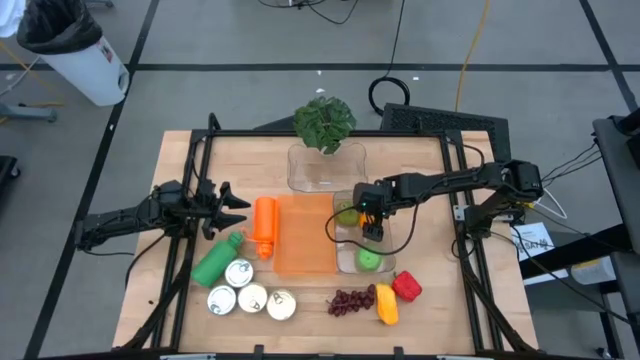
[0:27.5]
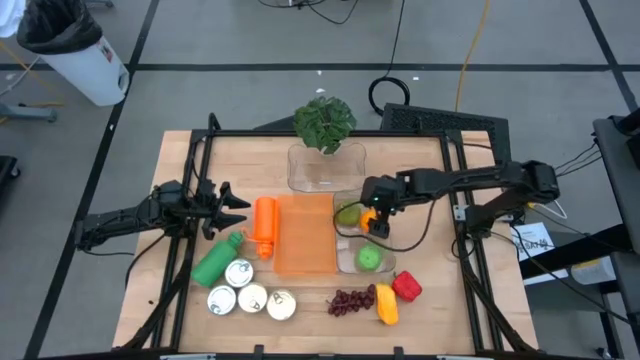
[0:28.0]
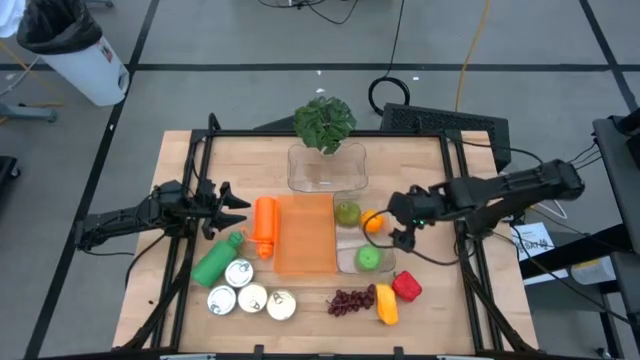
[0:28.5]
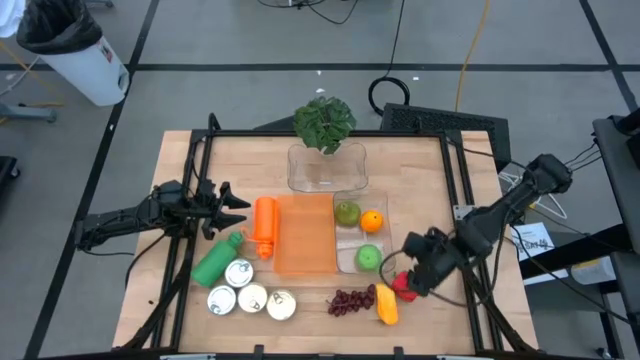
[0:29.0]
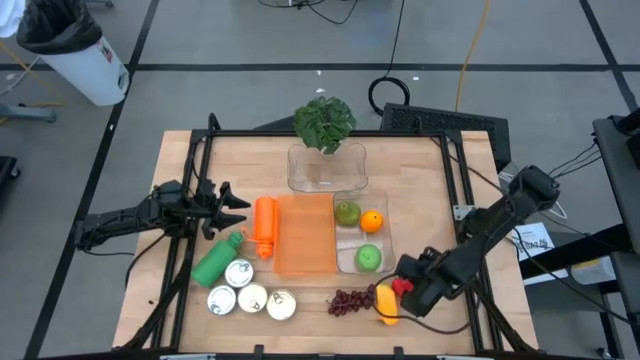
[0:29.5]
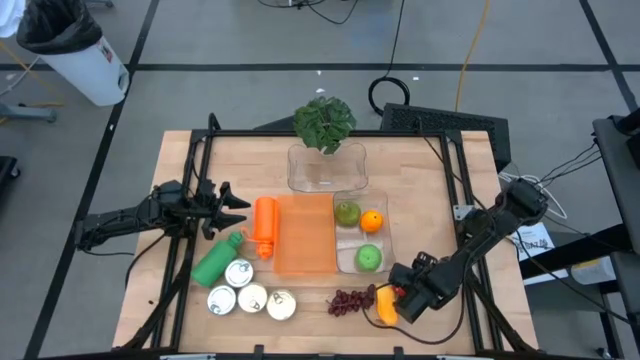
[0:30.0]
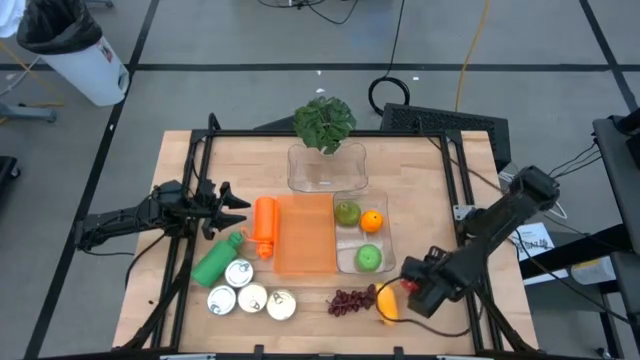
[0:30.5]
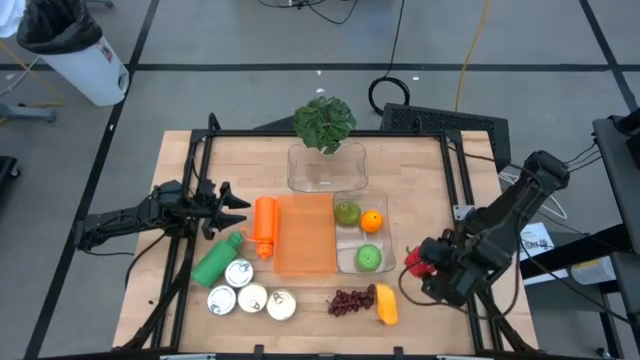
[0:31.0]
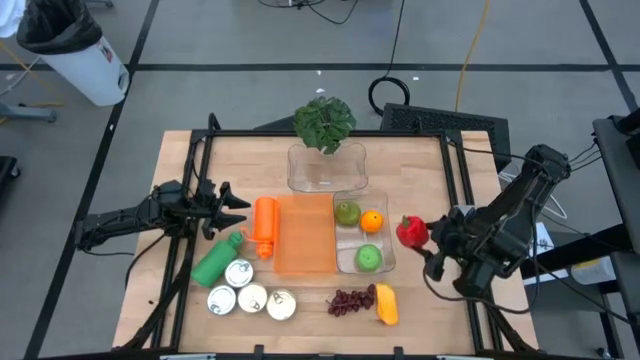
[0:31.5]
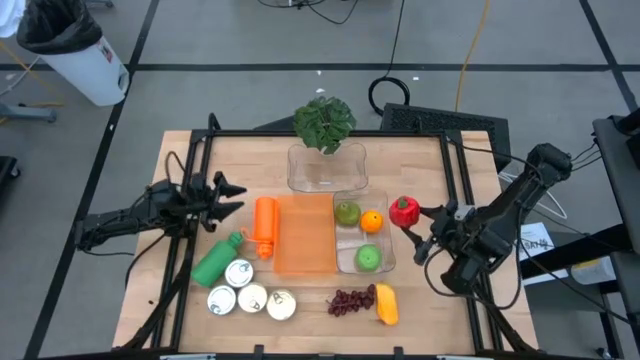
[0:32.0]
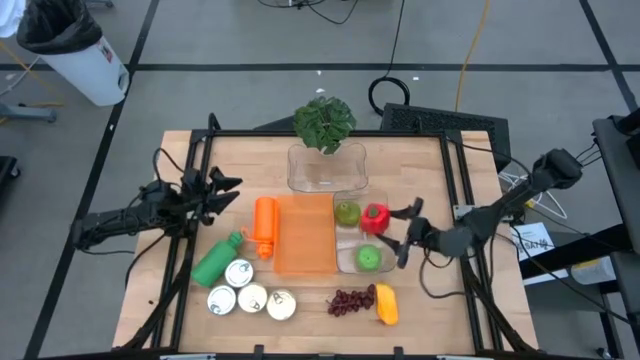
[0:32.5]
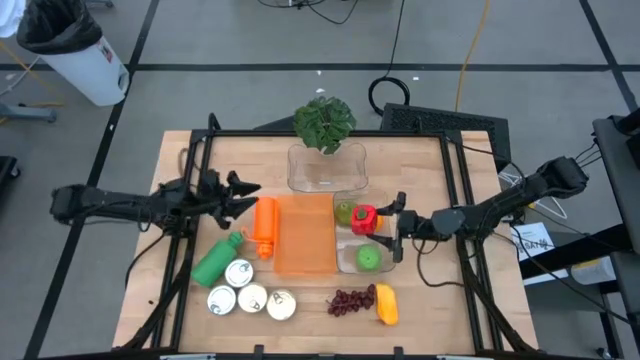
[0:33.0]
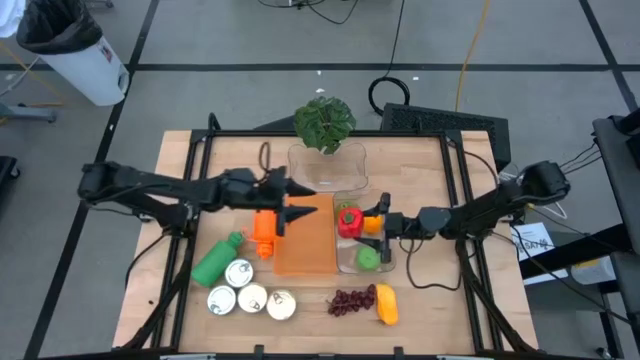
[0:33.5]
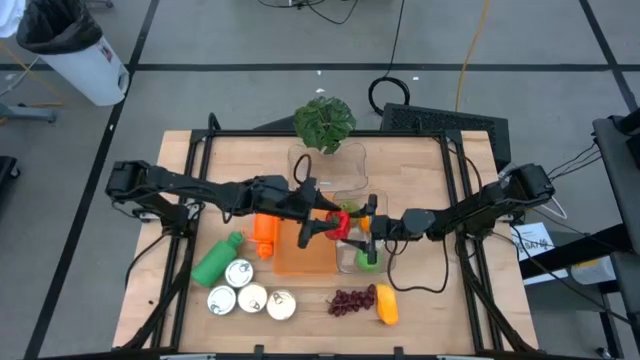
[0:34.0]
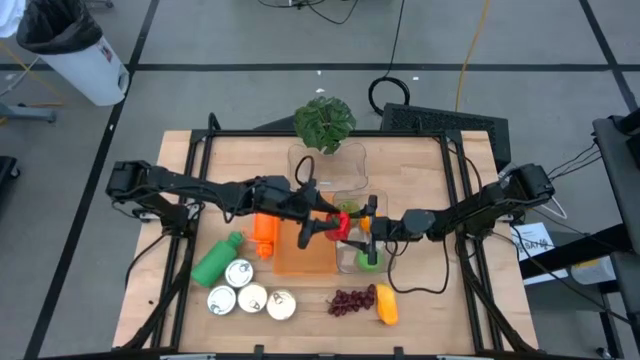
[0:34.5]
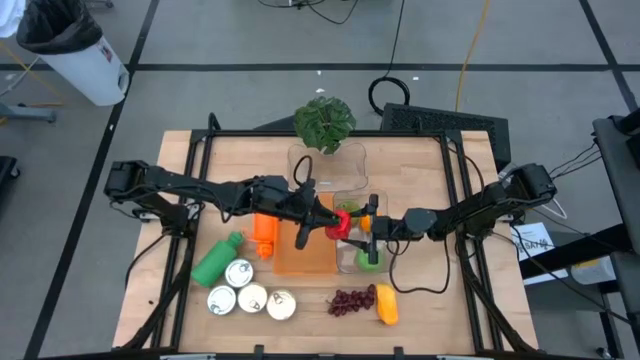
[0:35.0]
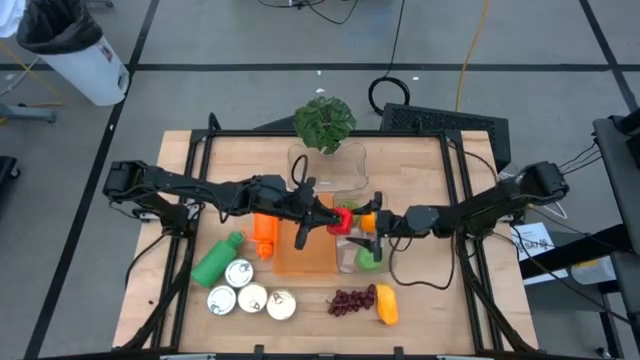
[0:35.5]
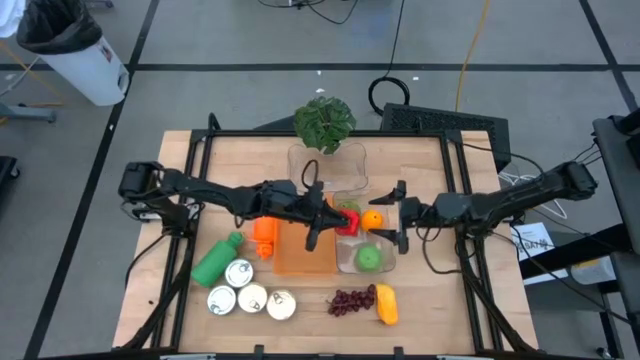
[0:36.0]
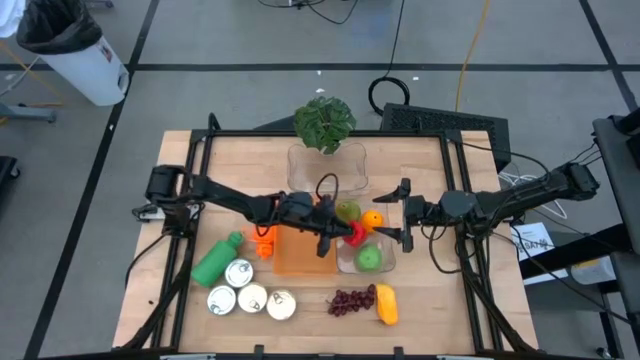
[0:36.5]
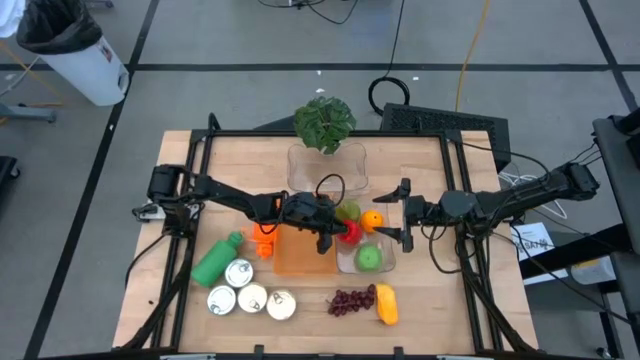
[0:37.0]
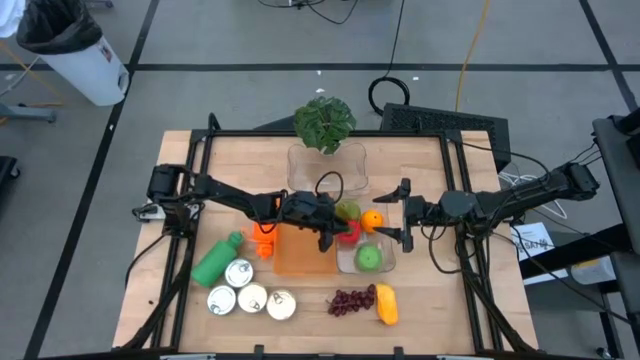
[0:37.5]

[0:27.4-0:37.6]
Task: Pick & Place Food Item
Put the red bell pepper into the bottom transparent bin

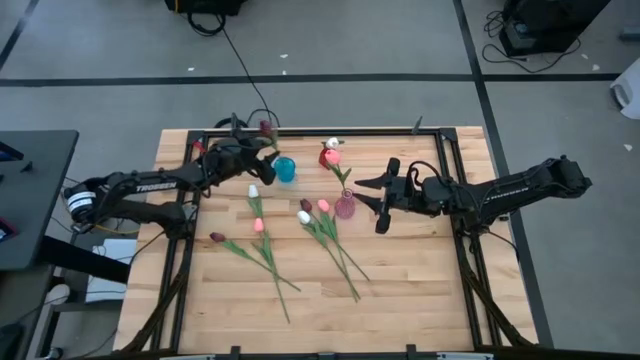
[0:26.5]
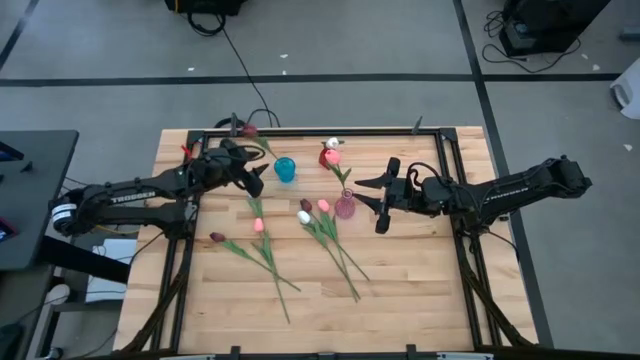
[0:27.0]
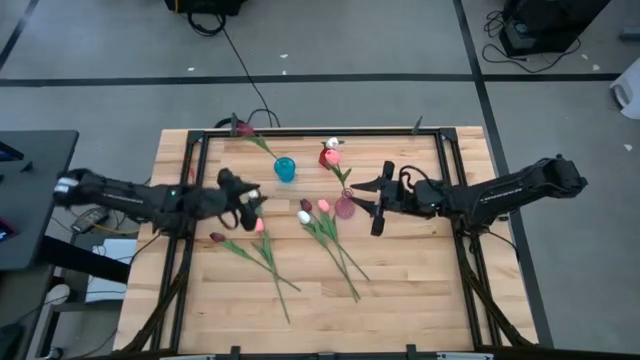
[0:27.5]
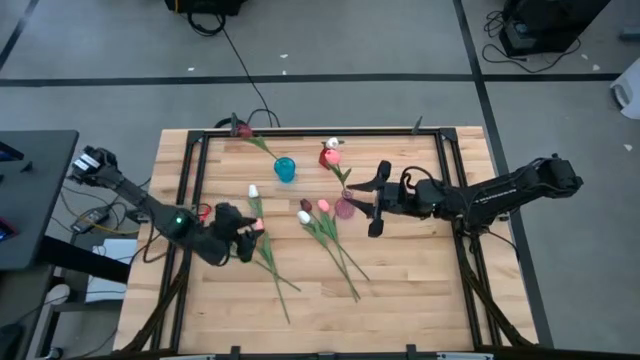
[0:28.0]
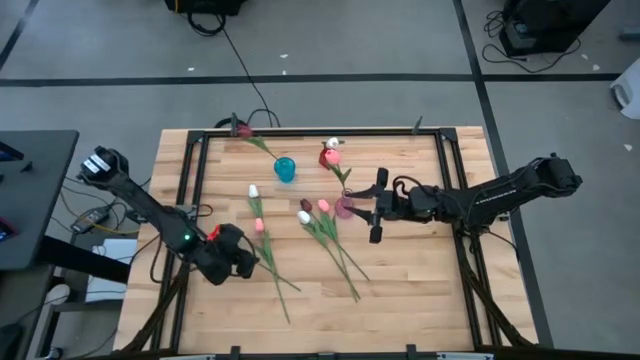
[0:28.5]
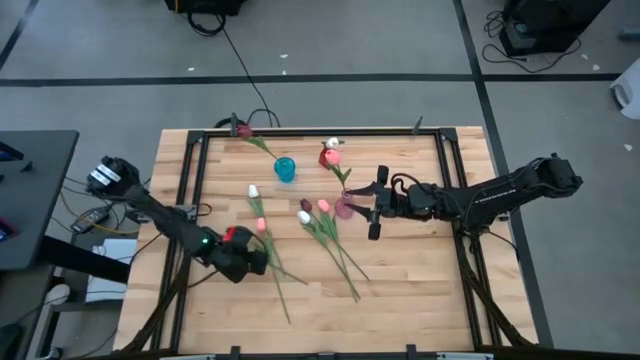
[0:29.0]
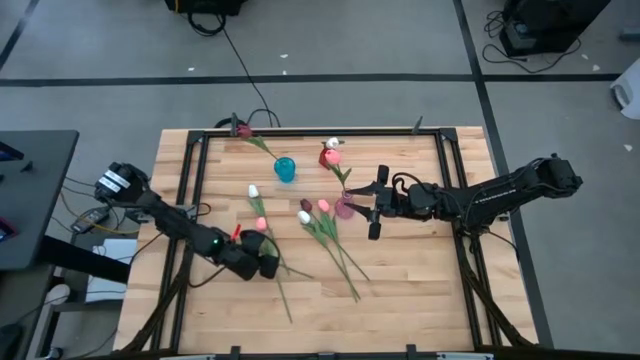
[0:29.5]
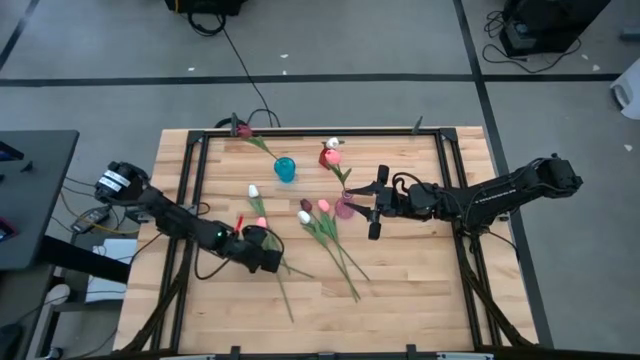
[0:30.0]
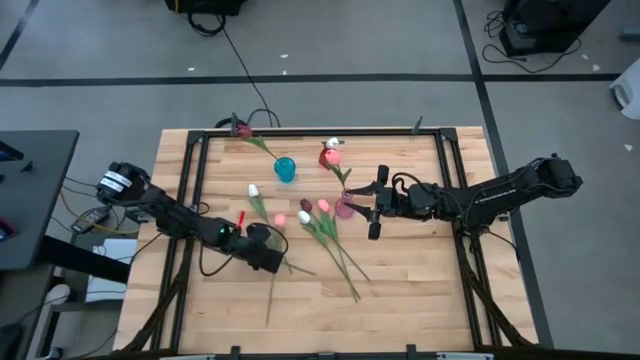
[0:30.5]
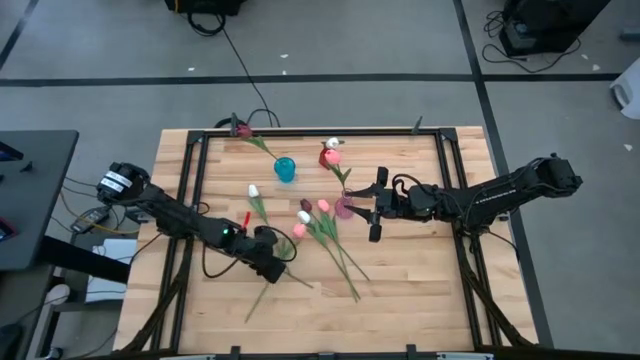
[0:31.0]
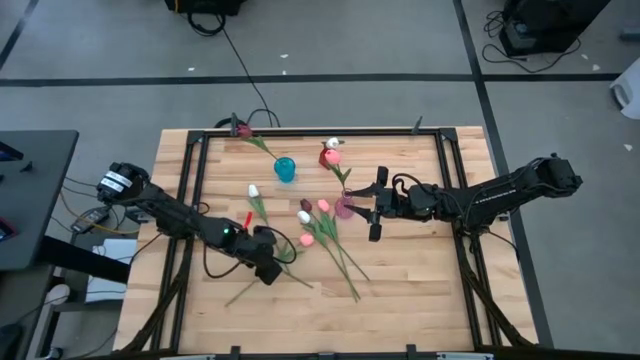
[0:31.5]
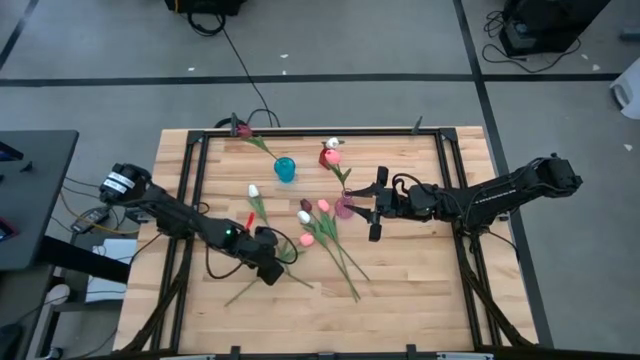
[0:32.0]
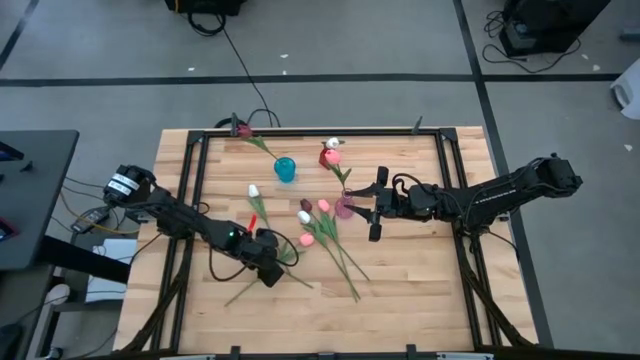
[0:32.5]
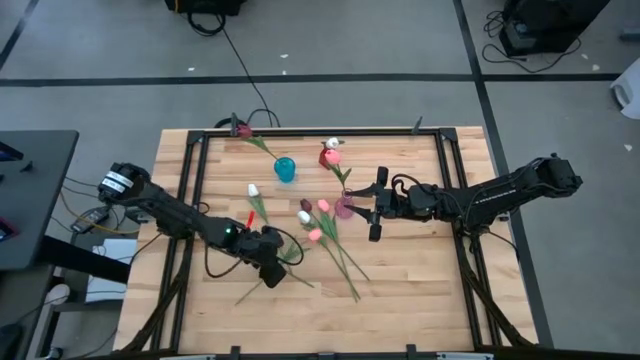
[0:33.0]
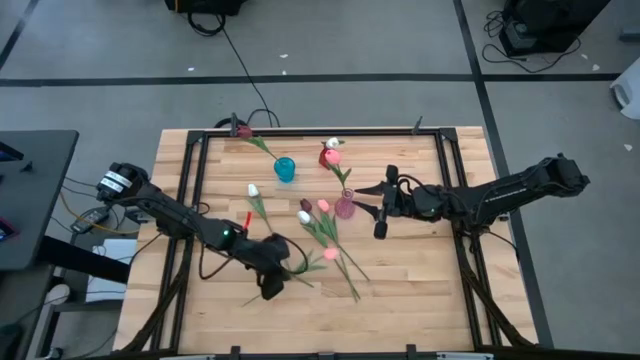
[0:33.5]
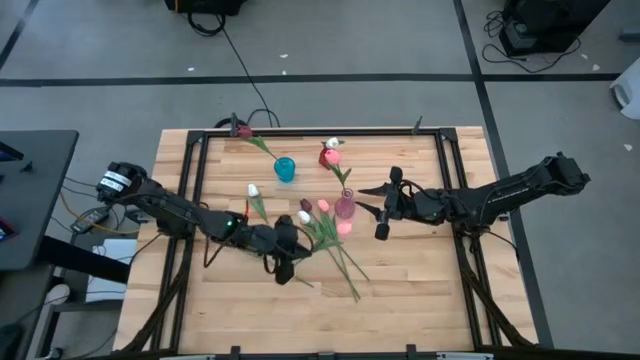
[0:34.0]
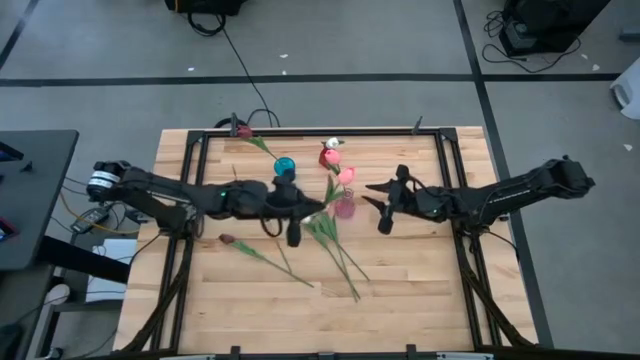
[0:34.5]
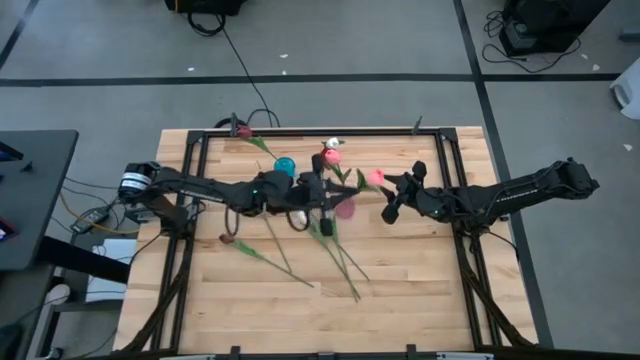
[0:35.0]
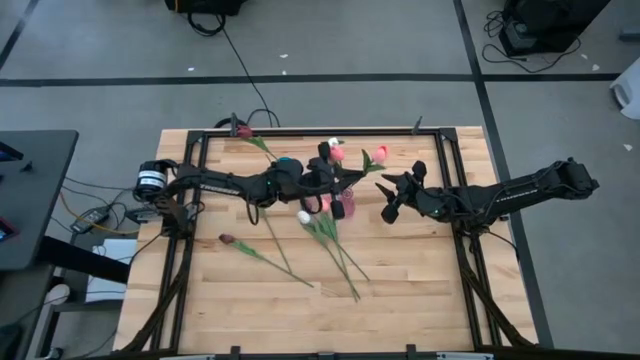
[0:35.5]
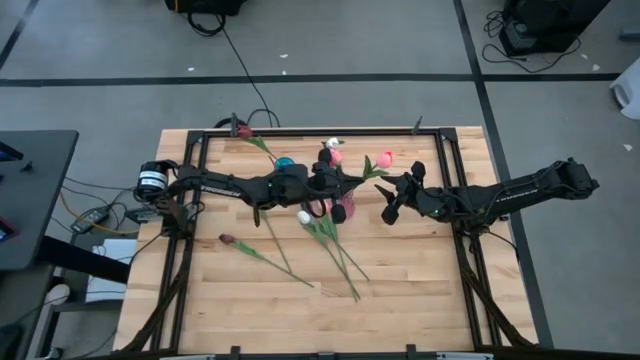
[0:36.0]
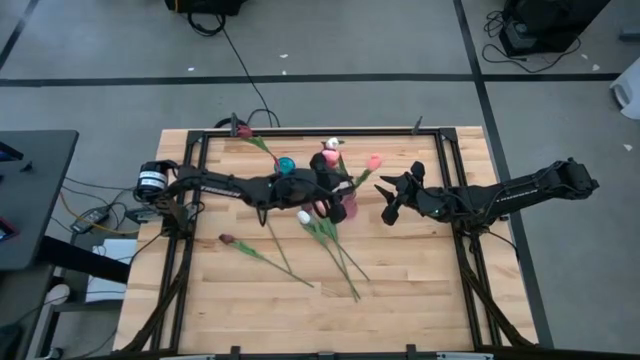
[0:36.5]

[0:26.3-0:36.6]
Task: Sort flowers into vase by color
Put the left pink tulip into the violet vase
